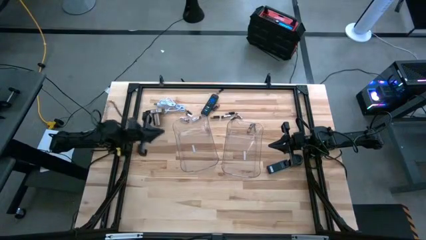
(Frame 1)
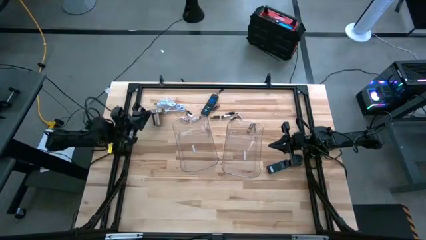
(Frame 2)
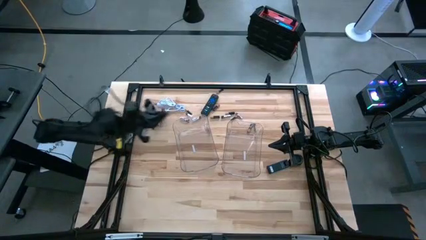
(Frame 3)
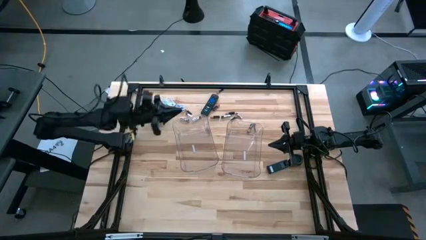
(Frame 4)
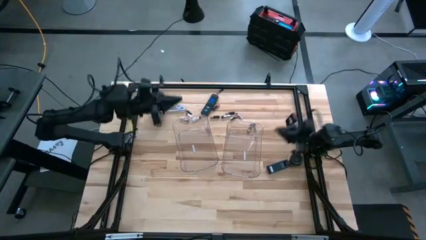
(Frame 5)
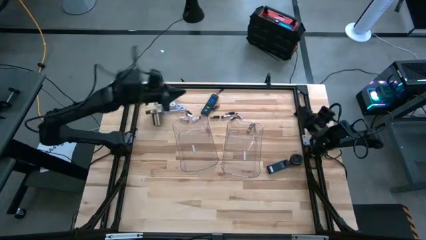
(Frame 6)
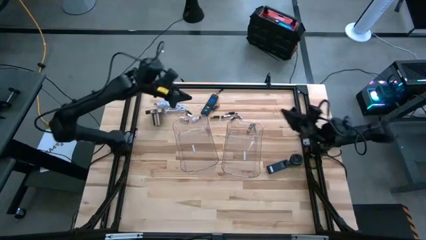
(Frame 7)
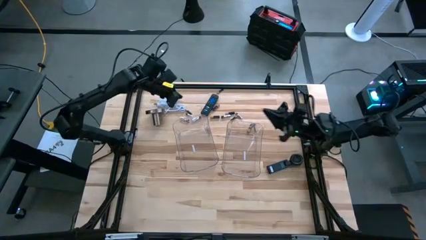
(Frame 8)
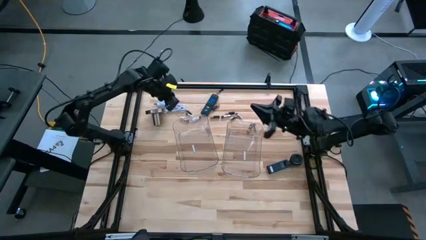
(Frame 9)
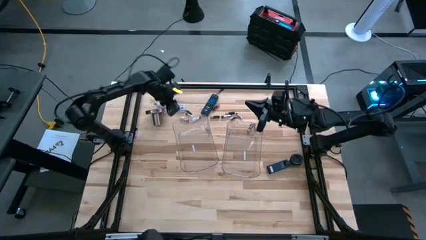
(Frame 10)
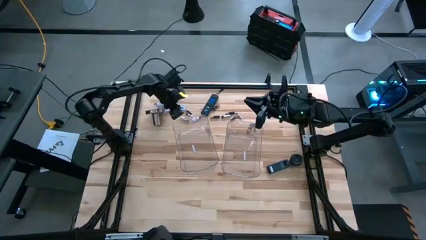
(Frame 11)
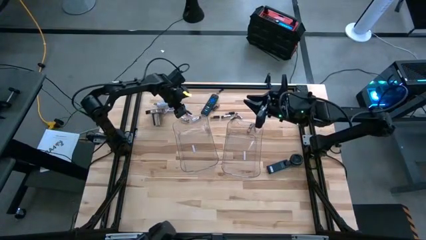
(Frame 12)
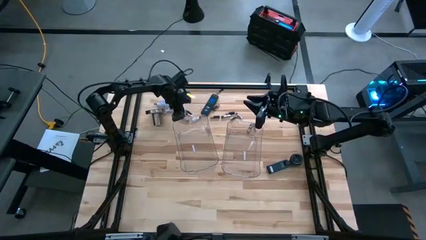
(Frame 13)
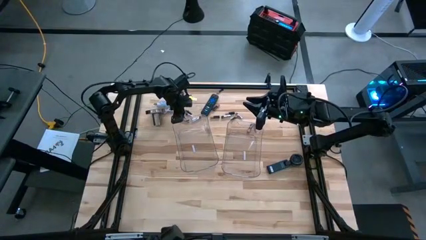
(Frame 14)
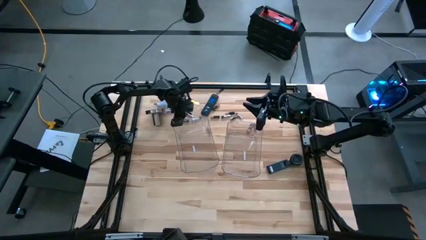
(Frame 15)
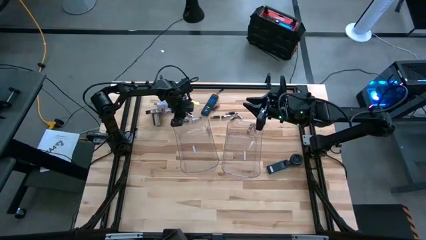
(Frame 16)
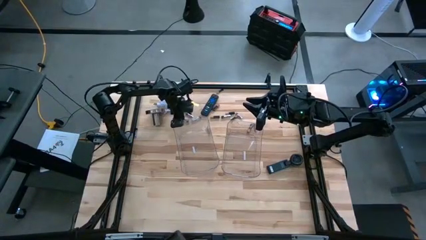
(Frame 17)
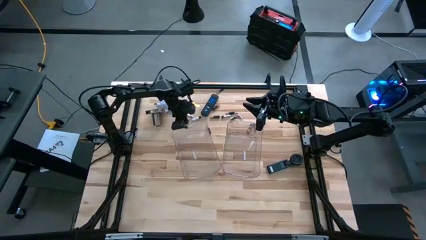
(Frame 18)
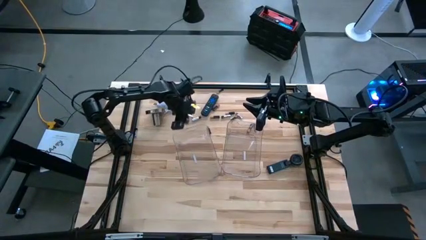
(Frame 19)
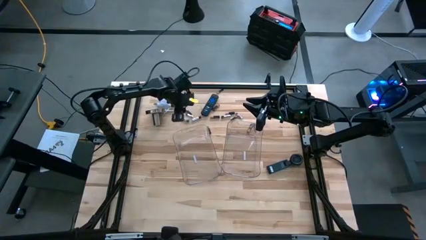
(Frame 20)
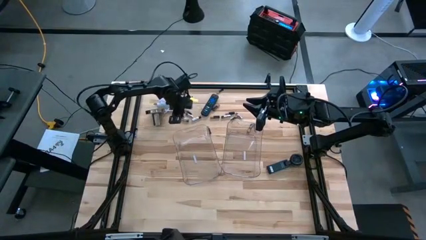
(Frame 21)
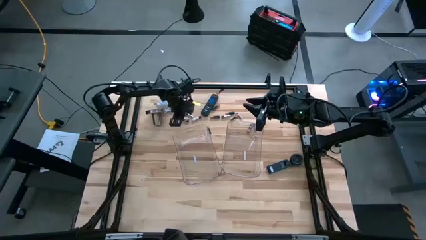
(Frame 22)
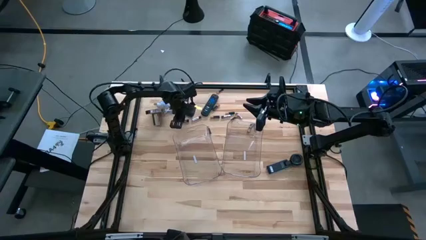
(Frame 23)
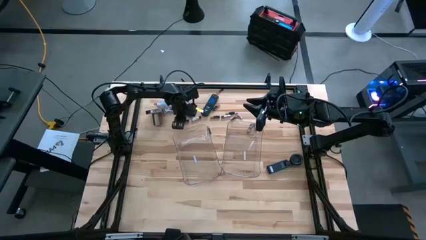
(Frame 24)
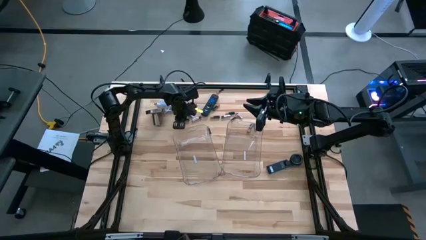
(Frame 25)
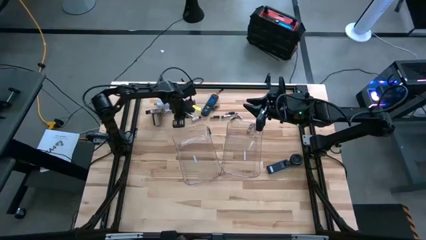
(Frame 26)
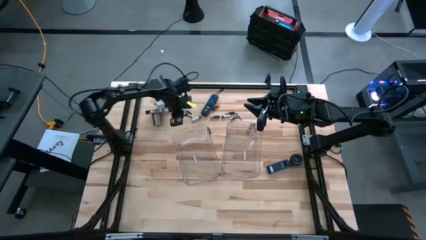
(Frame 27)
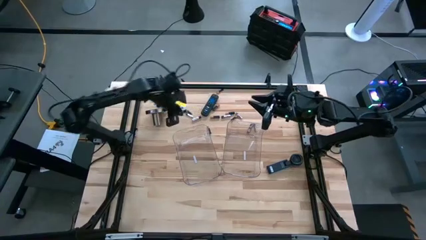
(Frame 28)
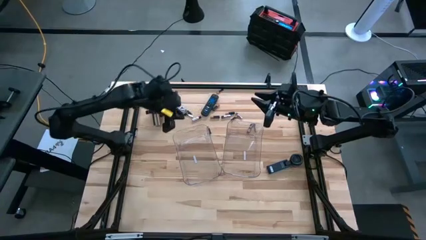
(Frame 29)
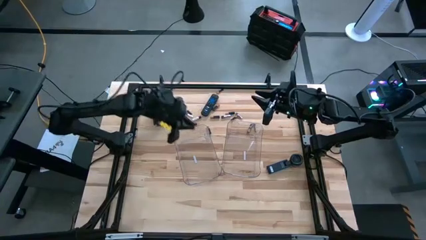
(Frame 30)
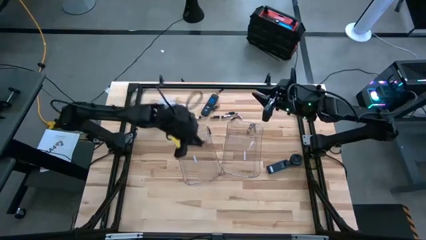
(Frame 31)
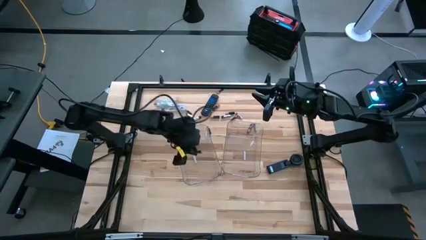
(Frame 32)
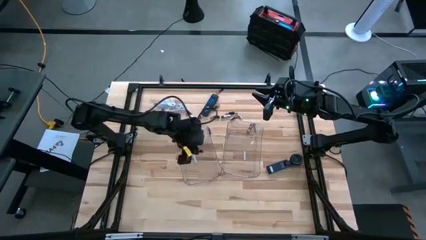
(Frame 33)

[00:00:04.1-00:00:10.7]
Task: Sort batteries
Put the silver battery into the left transparent bin

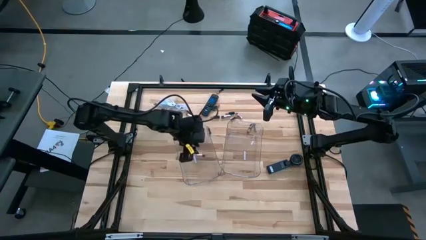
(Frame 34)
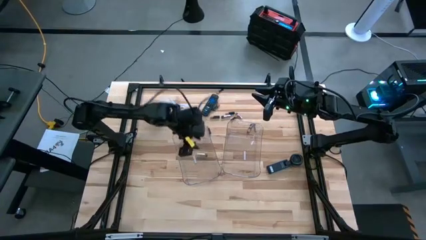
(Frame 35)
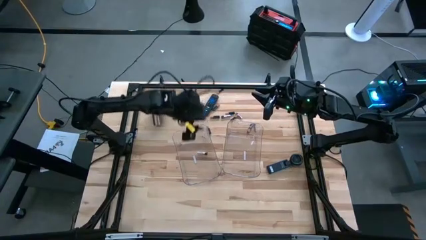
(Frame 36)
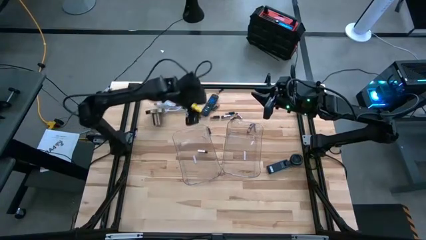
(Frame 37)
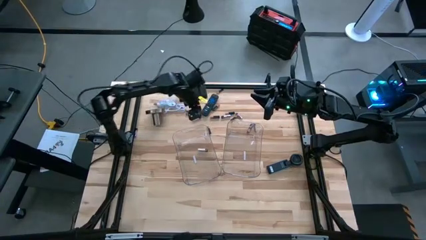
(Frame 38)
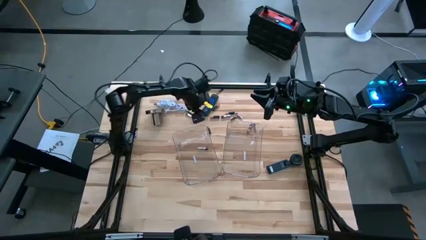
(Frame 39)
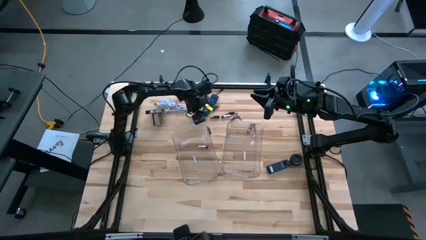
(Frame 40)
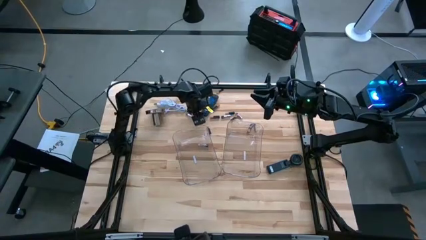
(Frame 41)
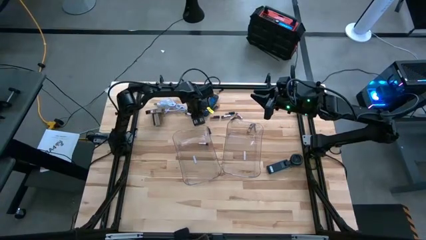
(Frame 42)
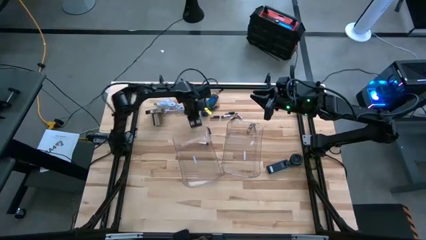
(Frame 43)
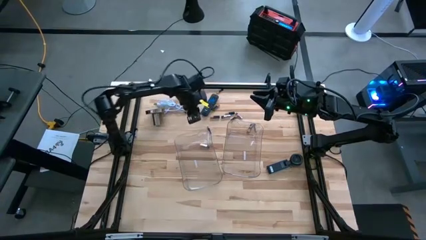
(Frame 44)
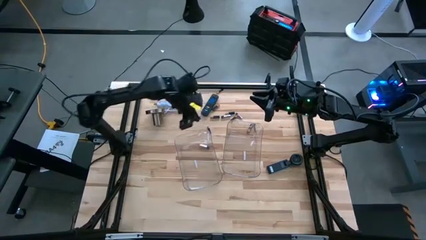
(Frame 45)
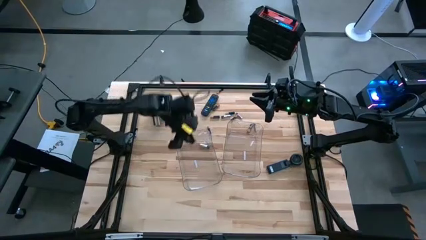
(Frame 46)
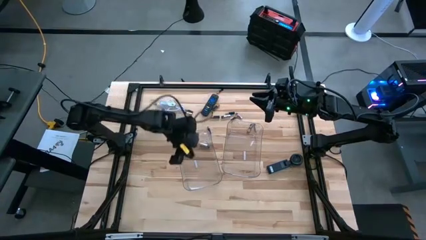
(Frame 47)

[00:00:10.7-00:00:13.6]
Put the silver battery into the left transparent bin

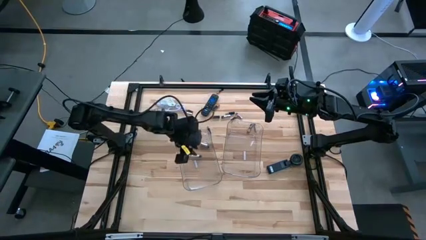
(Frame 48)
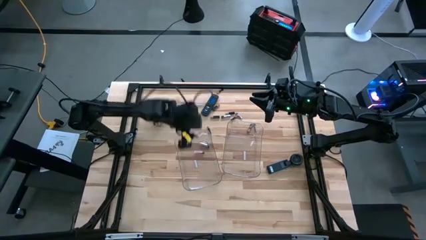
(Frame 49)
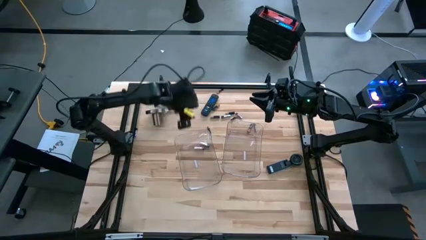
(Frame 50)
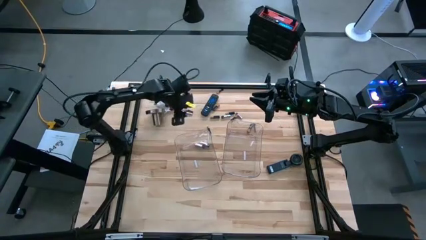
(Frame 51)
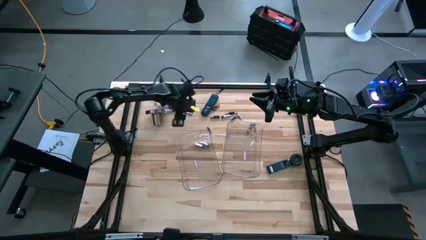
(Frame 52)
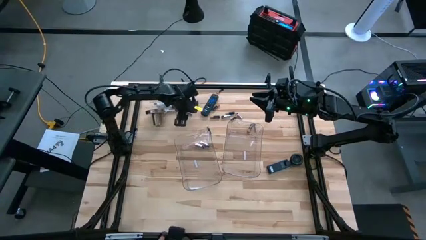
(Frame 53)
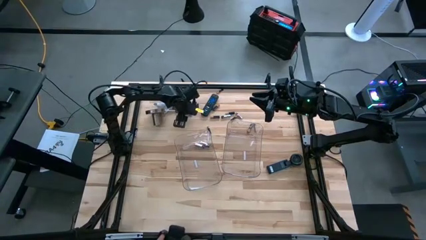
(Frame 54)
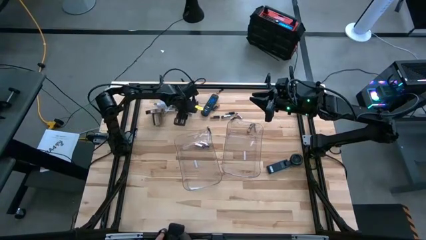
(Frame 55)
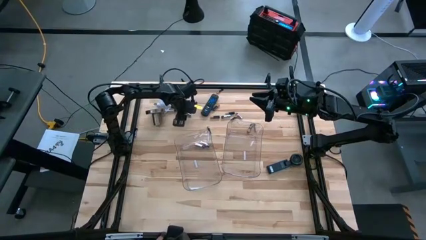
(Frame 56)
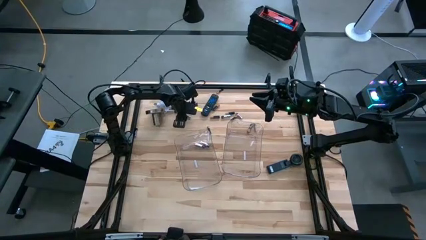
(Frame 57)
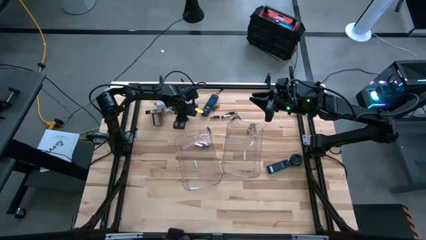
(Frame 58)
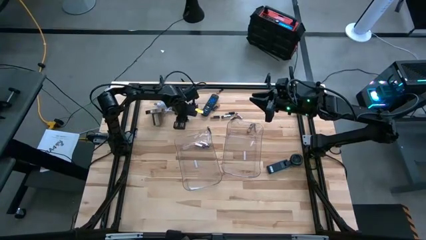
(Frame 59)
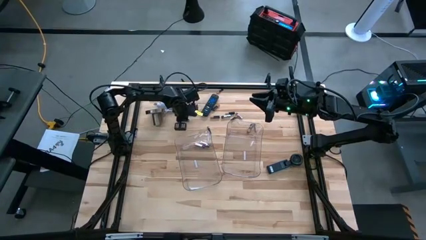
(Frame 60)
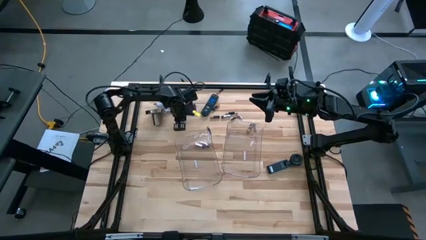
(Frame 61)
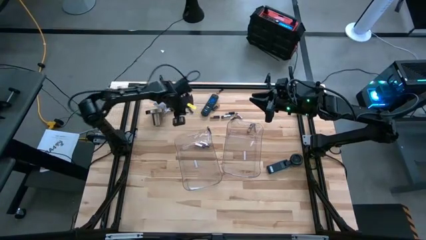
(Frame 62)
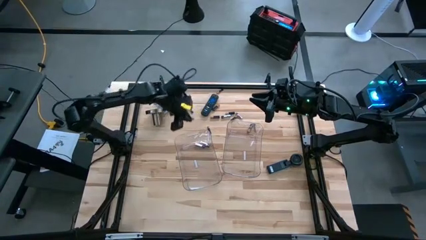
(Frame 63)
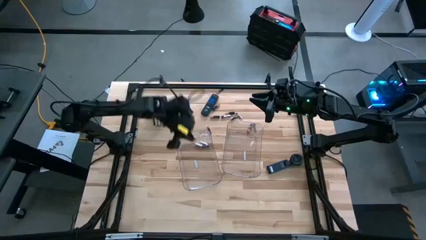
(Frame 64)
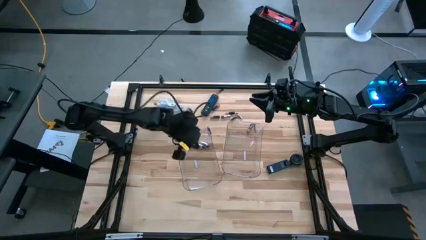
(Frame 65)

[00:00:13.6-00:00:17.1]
Put the silver battery into the left transparent bin

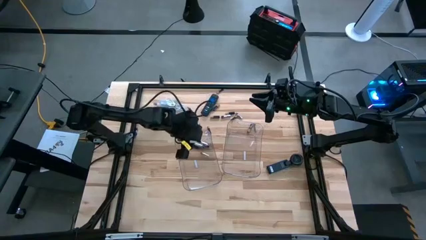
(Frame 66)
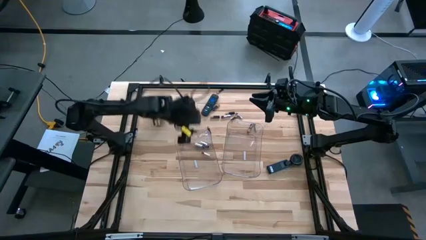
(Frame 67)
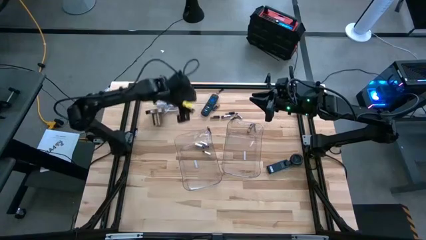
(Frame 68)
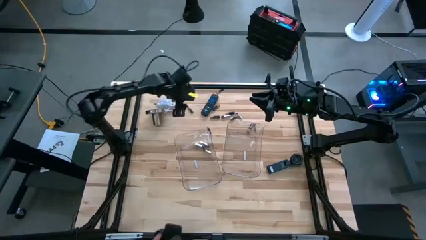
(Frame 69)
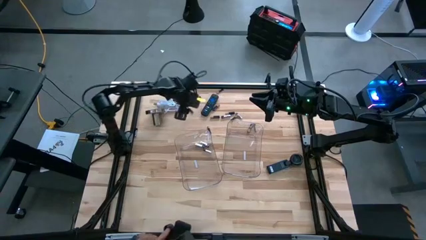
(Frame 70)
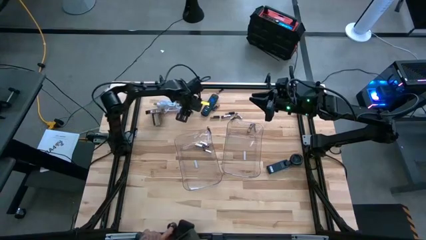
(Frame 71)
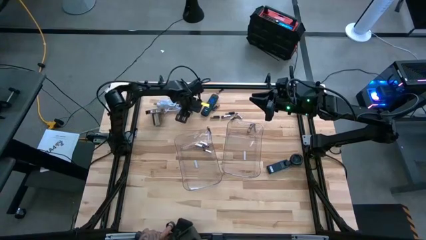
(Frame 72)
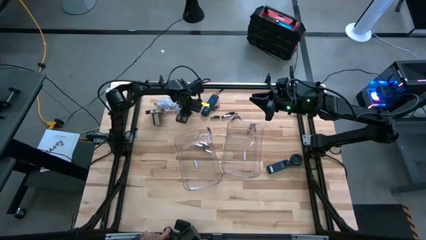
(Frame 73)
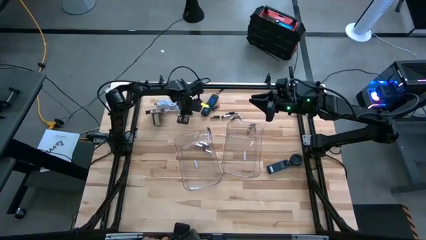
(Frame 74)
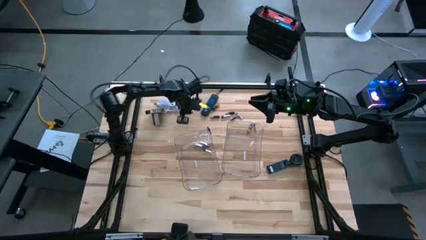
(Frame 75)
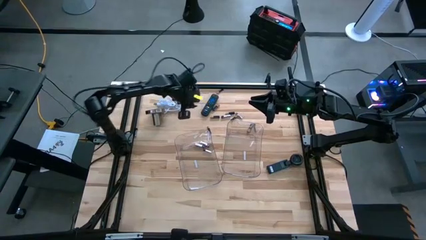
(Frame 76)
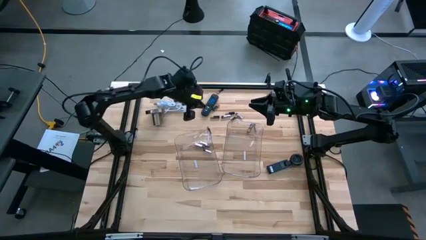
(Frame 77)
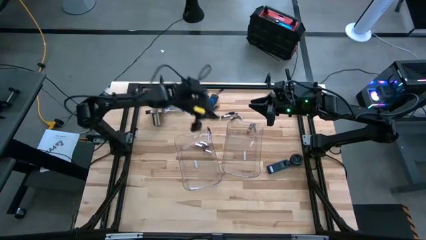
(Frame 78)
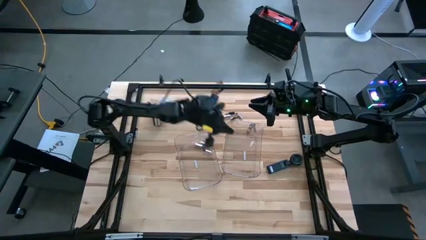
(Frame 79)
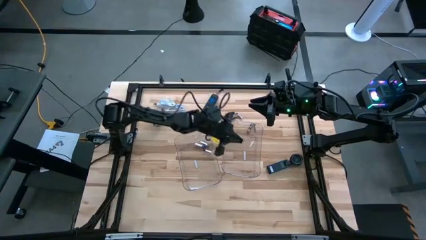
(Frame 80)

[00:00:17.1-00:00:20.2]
Put the black battery into the right transparent bin

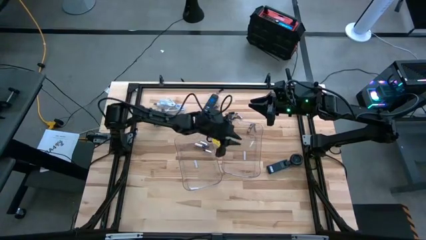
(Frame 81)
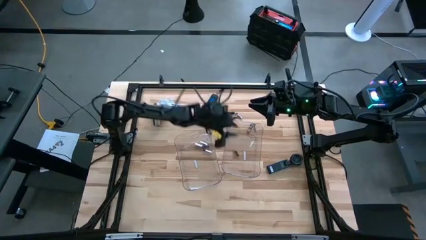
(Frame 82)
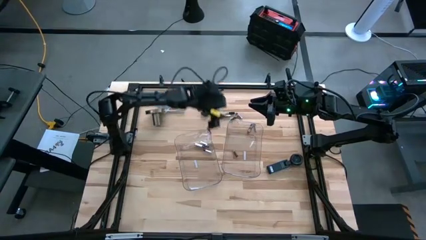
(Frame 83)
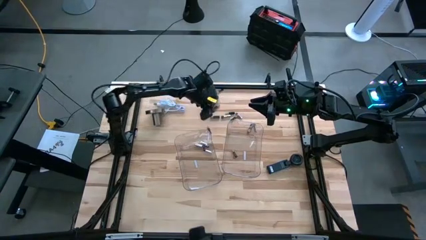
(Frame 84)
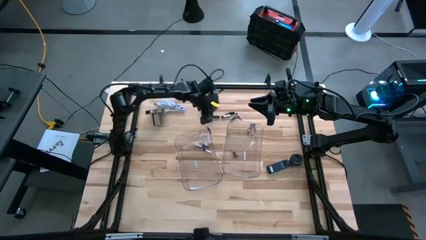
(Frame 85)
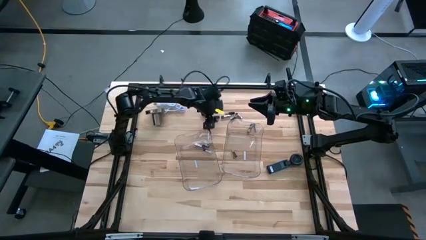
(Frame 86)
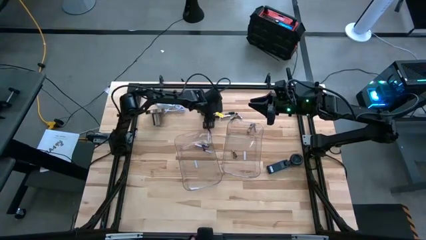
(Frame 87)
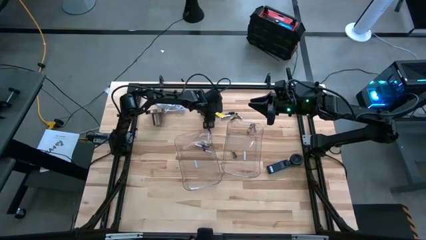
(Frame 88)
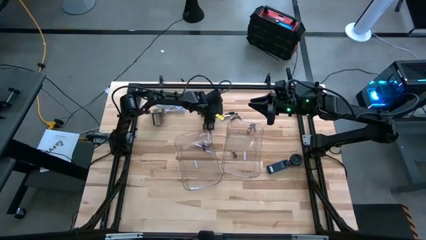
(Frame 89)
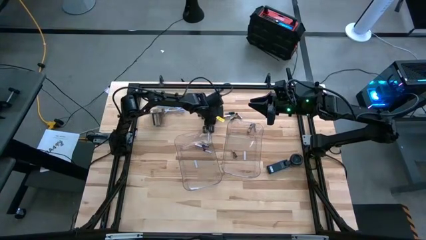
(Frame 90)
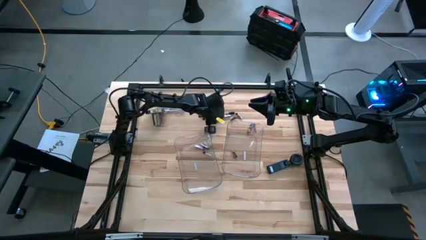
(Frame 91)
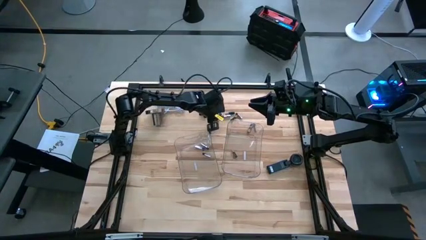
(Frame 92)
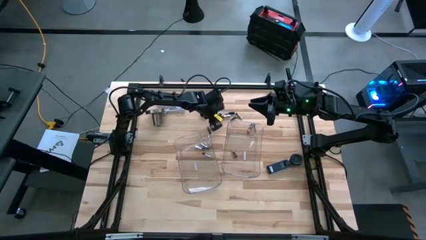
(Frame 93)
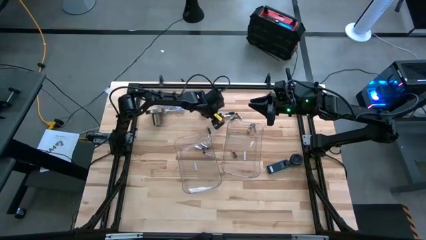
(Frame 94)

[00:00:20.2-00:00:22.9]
Put the black battery into the right transparent bin
